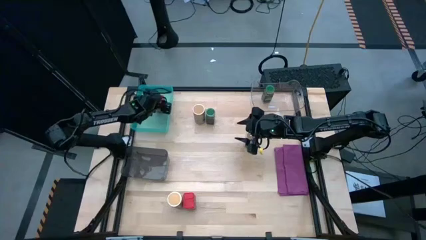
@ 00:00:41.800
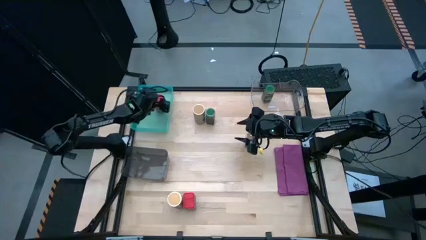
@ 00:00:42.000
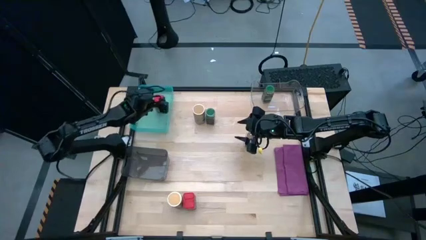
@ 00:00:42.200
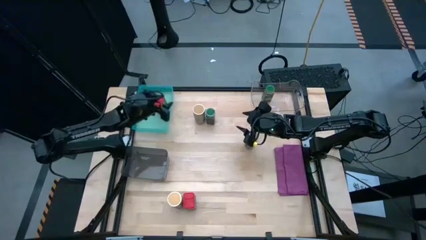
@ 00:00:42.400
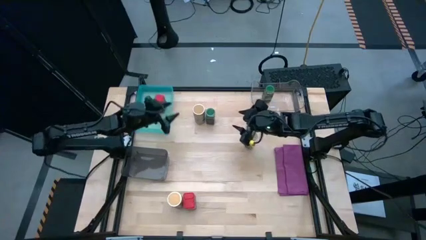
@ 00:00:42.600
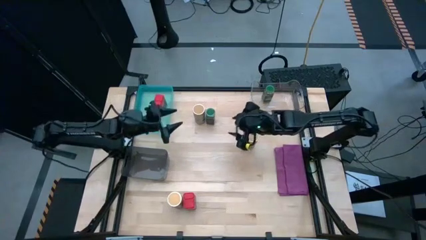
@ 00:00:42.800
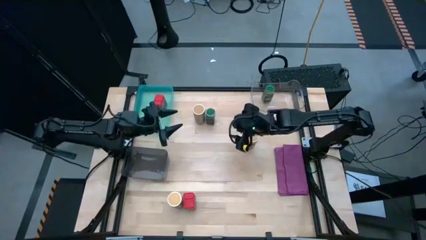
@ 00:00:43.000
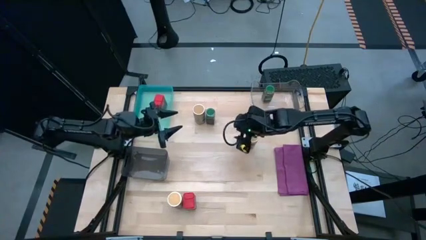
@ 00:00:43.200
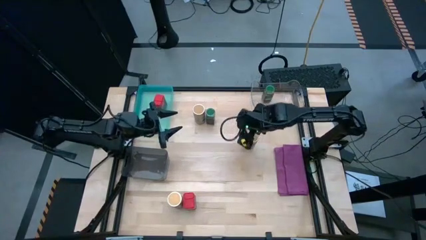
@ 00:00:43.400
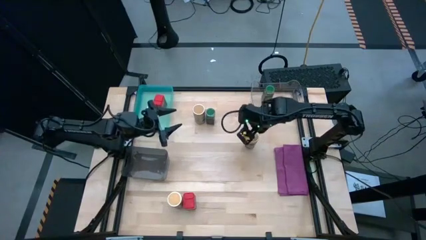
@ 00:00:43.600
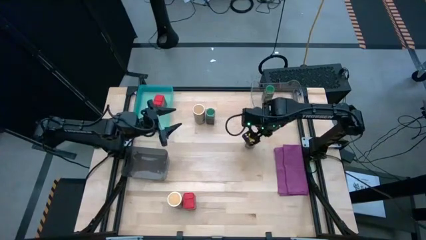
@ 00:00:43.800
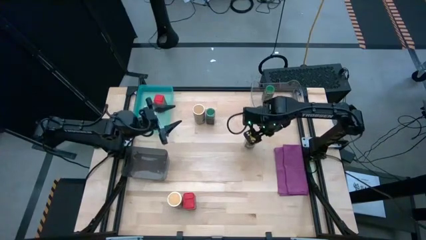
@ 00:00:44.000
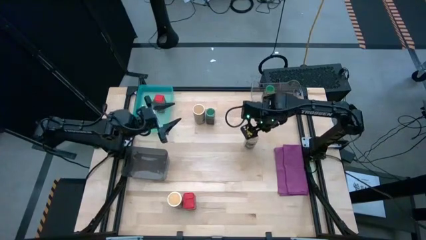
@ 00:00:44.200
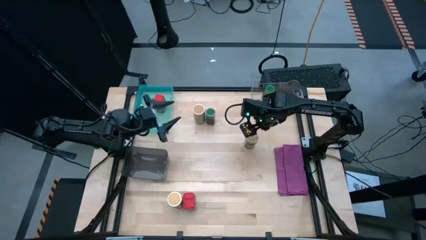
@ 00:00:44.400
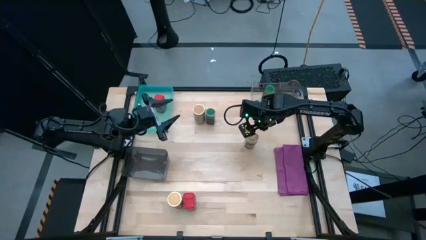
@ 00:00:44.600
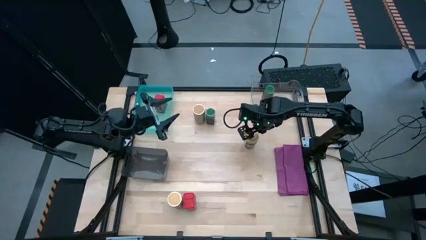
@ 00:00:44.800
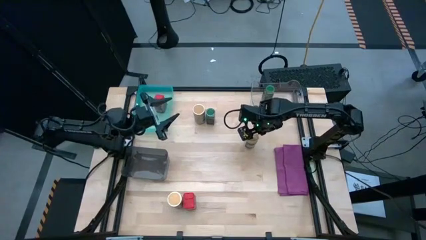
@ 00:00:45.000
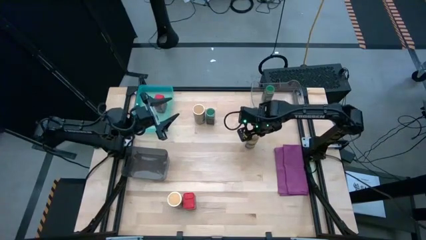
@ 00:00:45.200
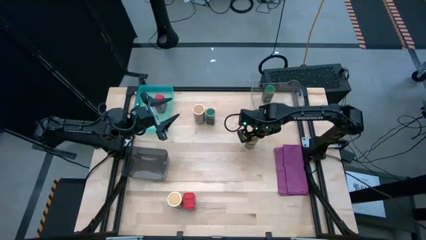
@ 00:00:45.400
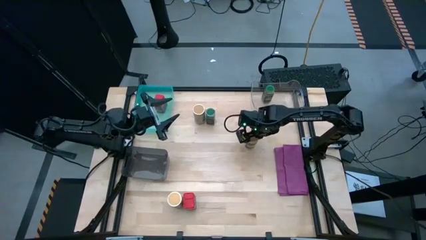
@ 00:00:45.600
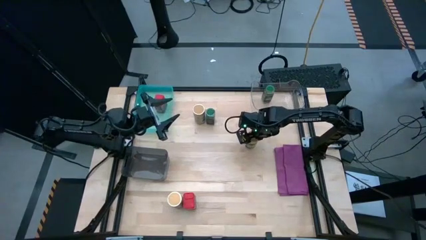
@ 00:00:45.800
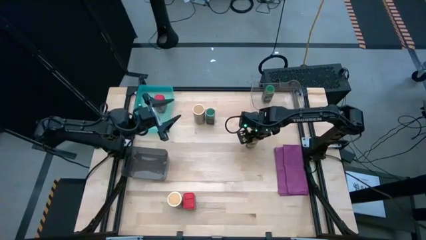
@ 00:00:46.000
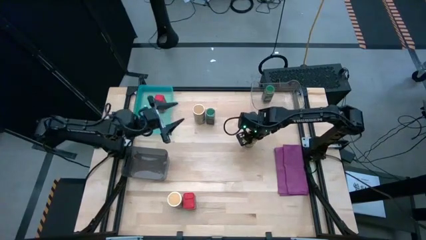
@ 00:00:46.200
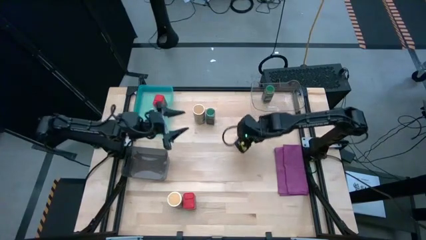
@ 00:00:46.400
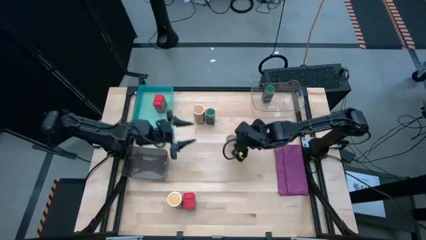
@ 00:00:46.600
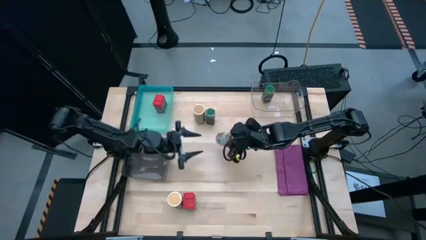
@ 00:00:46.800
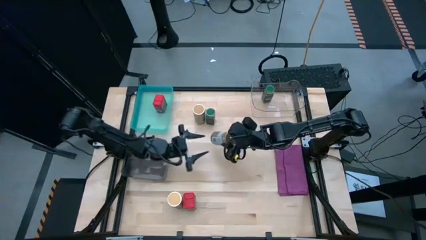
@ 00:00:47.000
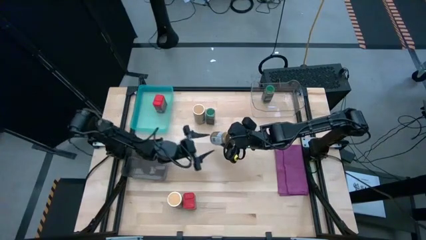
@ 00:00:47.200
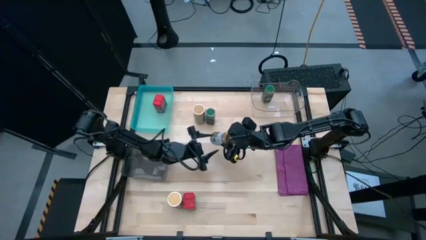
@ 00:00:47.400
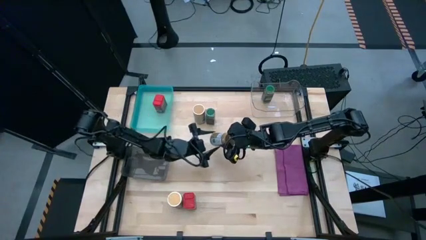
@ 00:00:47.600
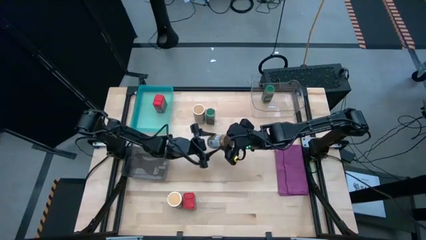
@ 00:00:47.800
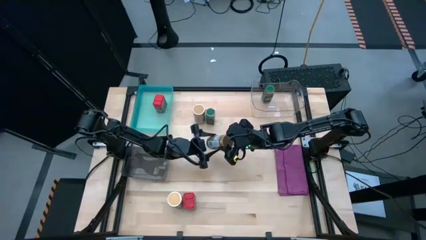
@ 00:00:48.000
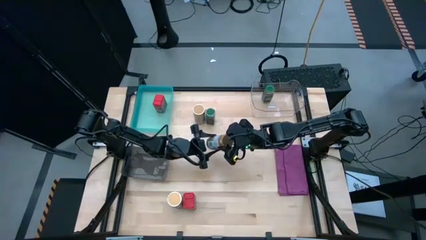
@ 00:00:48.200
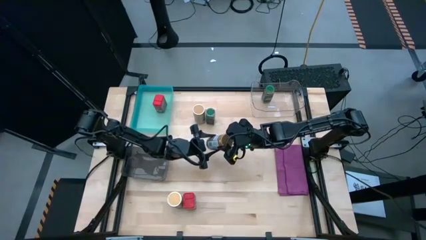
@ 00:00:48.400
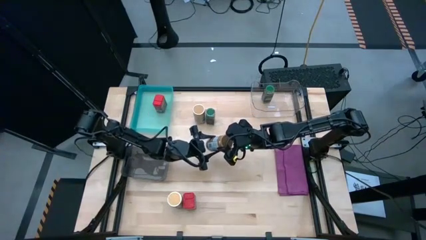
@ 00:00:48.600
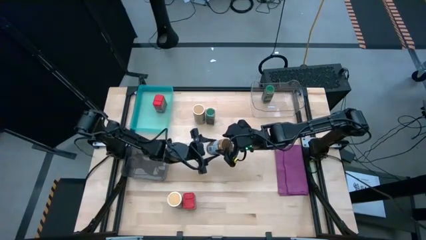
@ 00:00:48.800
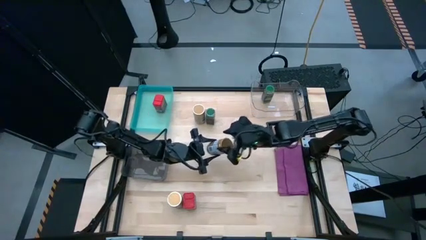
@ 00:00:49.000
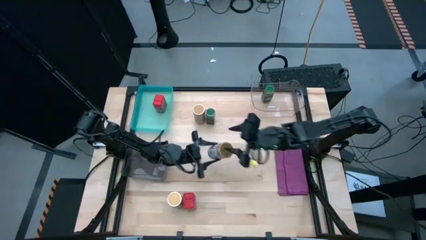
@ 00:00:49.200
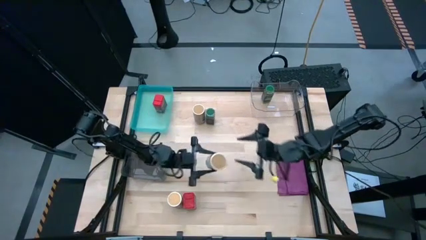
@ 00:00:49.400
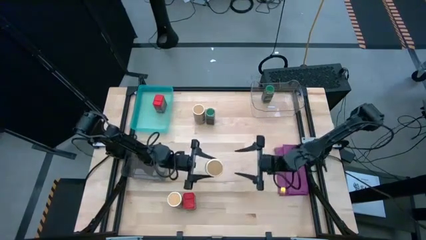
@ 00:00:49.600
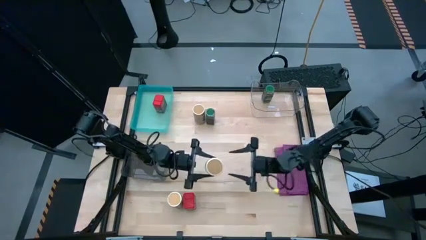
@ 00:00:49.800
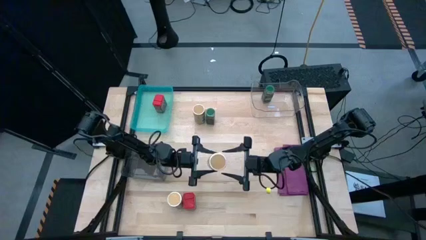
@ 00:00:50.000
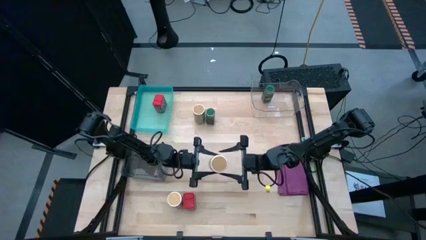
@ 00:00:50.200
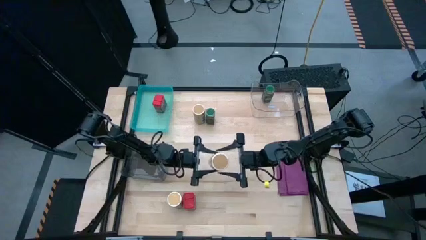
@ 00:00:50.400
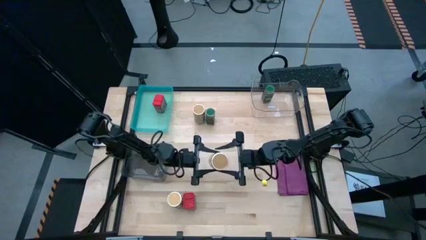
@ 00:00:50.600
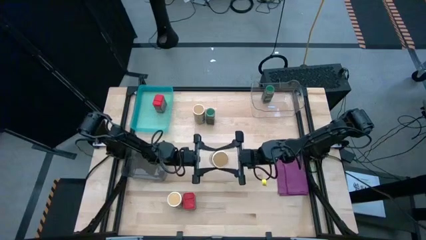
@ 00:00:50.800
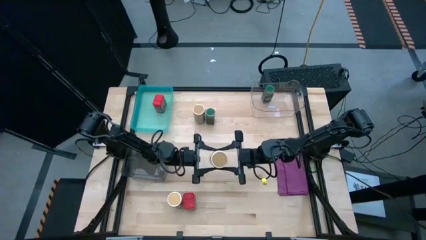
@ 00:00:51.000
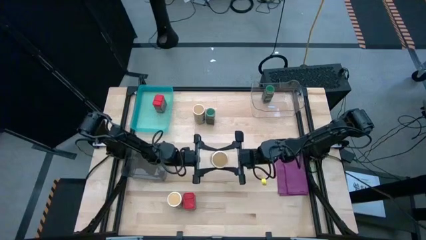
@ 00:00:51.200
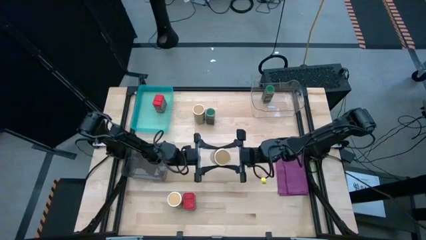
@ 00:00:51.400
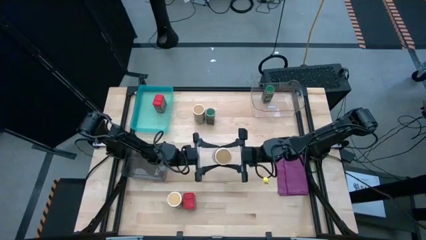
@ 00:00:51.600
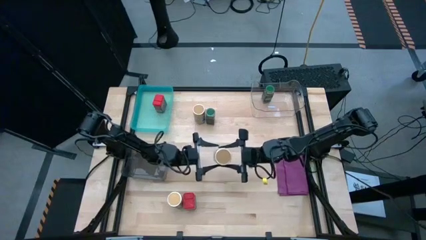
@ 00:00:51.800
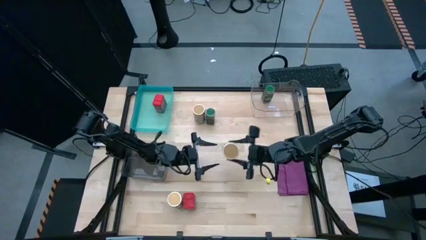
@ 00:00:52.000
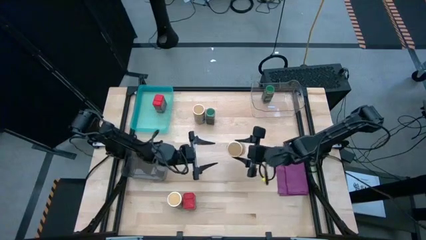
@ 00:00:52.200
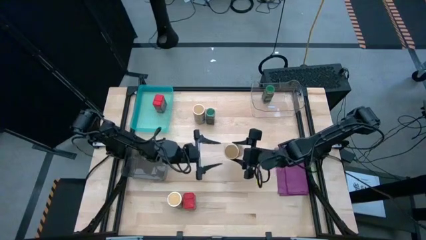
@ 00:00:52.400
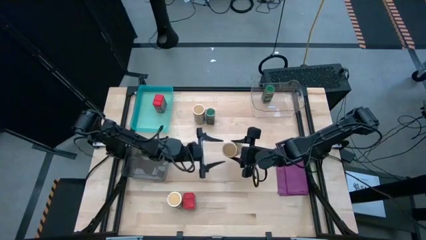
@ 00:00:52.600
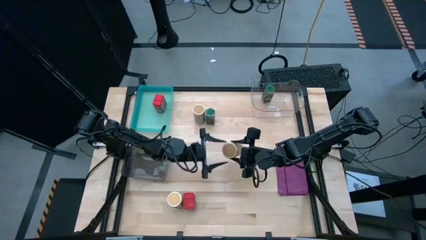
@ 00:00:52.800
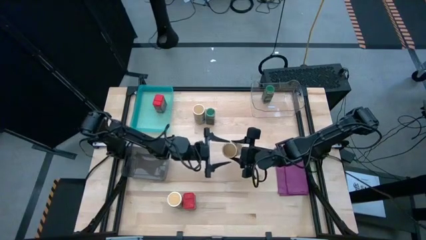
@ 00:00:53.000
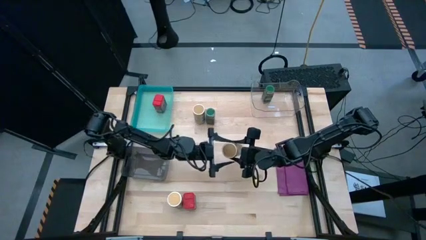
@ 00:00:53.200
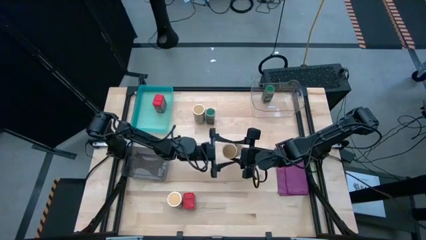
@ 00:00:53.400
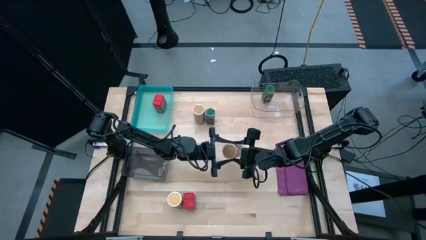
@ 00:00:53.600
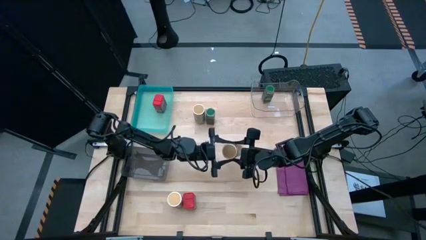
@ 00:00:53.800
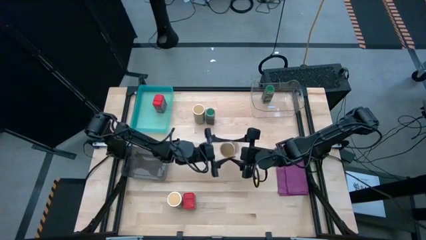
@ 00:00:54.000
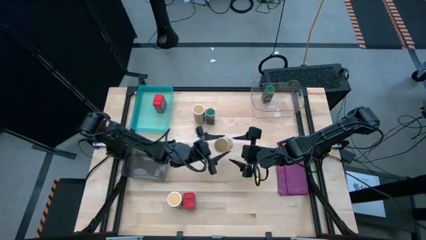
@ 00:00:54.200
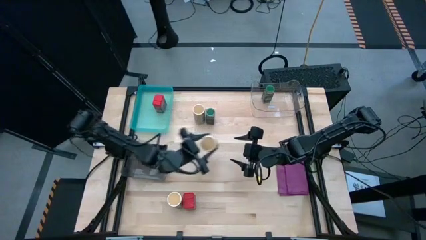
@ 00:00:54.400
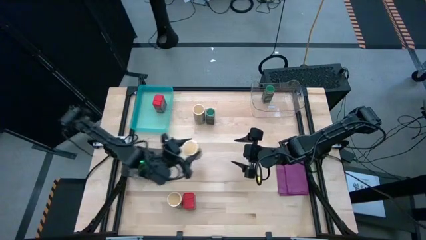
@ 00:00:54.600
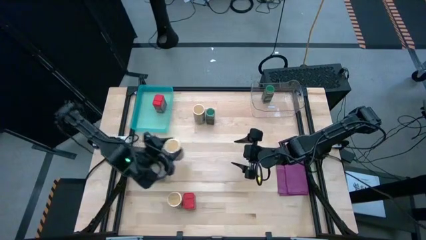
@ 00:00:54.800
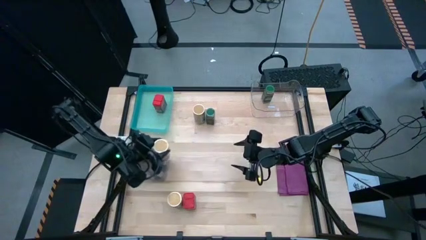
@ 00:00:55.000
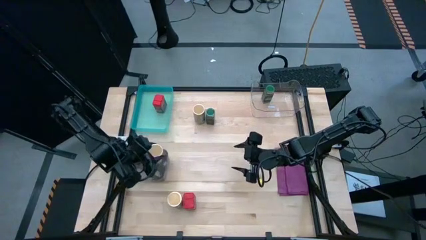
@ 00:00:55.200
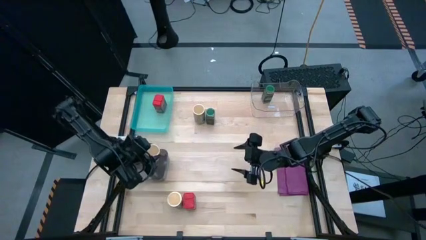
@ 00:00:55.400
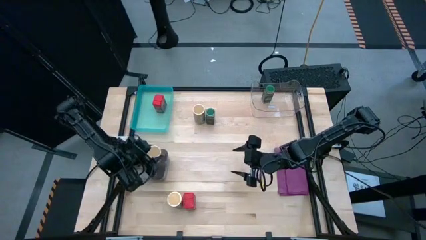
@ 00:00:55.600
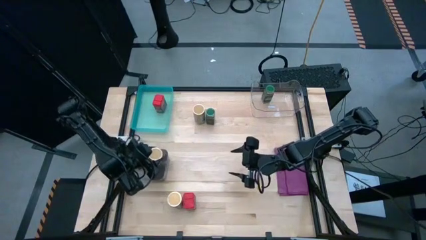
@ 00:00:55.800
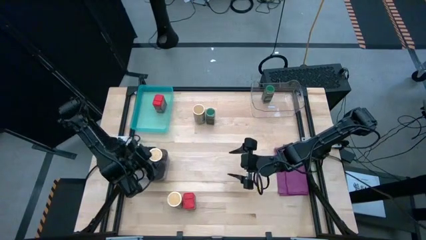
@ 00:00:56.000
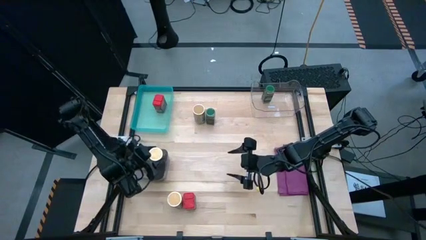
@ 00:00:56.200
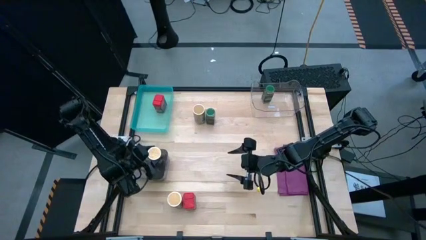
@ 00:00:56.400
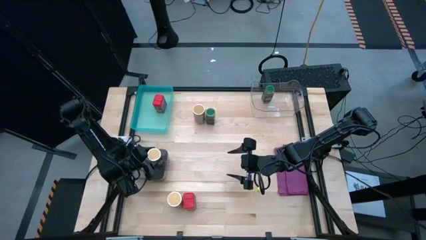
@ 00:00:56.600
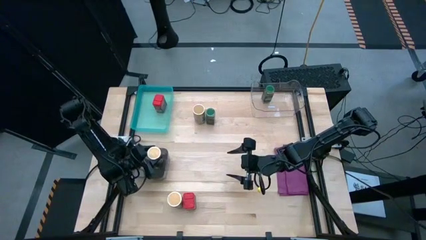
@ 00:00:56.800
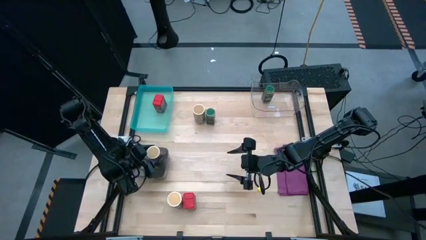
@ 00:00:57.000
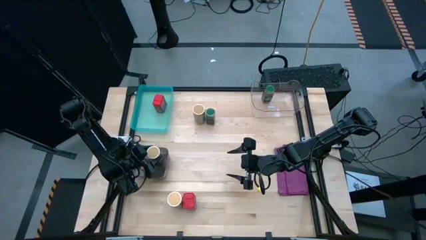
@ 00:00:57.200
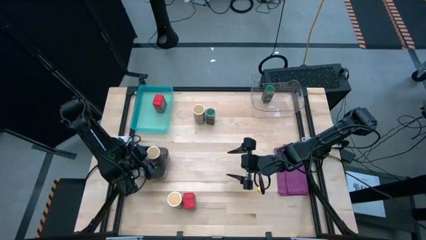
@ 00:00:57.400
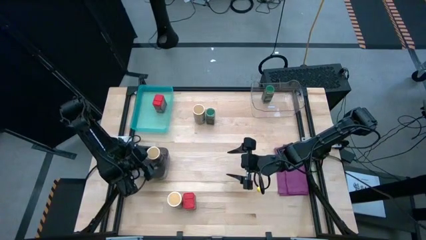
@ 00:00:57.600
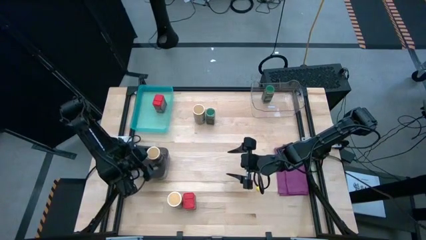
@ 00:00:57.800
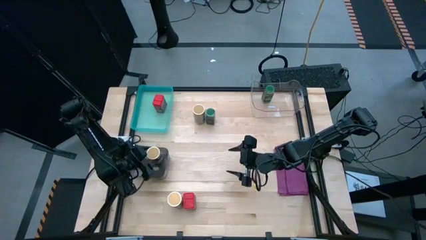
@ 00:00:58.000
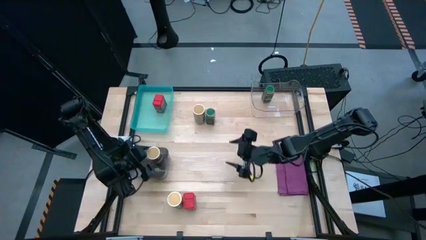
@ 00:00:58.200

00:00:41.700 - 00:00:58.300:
Task: Sort spices by type
Put the middle gold seasoning bottle into the black bin
